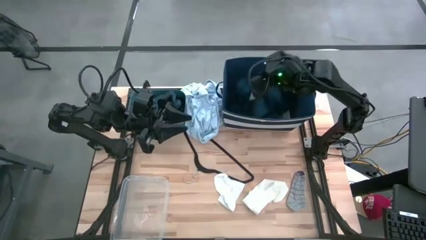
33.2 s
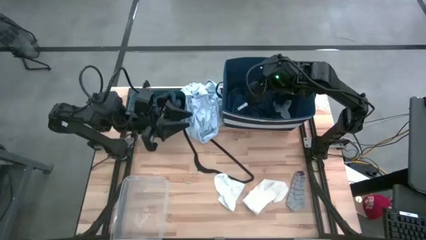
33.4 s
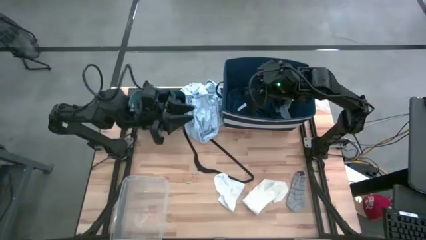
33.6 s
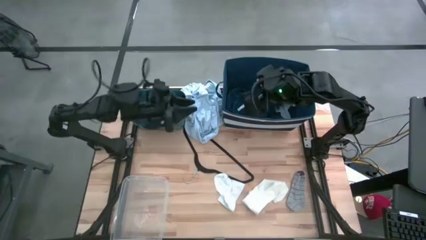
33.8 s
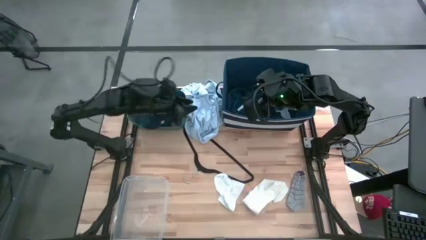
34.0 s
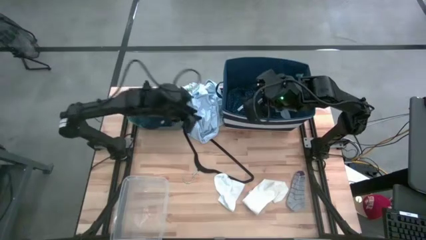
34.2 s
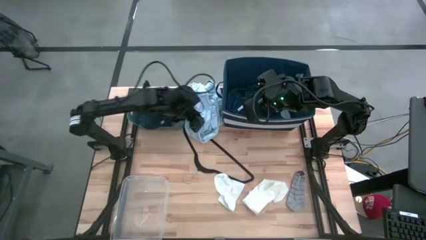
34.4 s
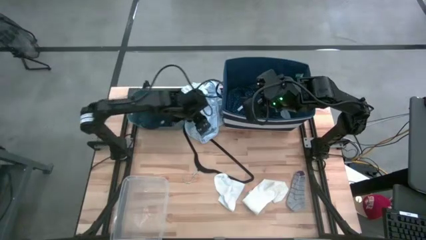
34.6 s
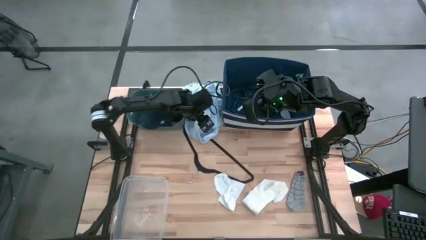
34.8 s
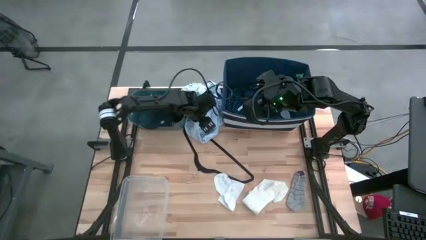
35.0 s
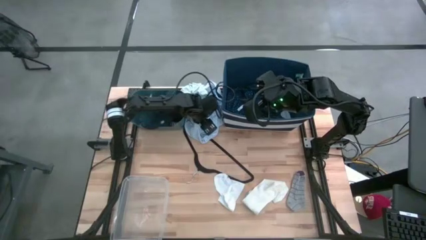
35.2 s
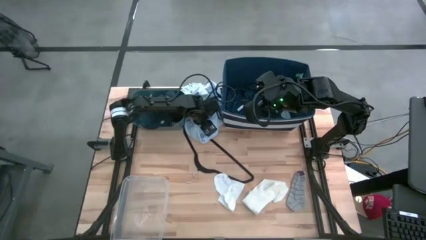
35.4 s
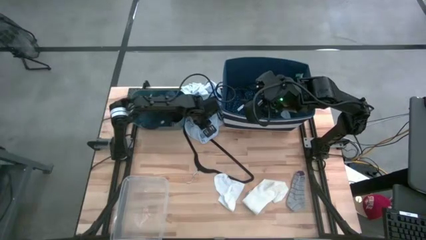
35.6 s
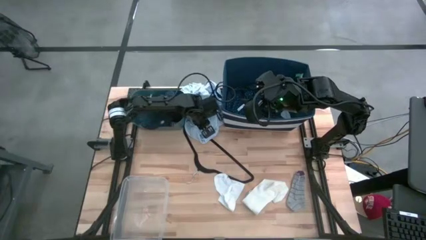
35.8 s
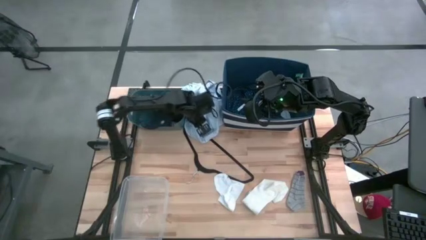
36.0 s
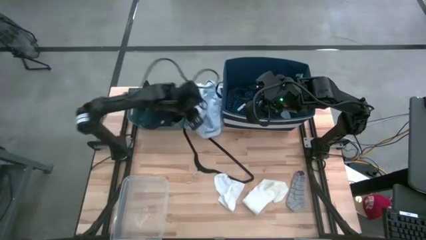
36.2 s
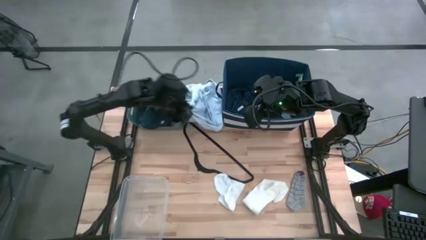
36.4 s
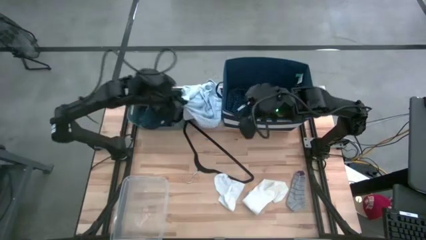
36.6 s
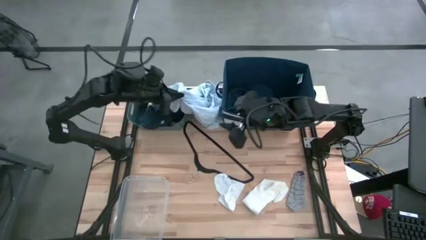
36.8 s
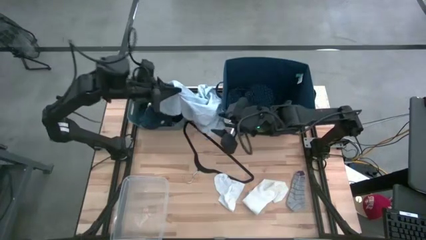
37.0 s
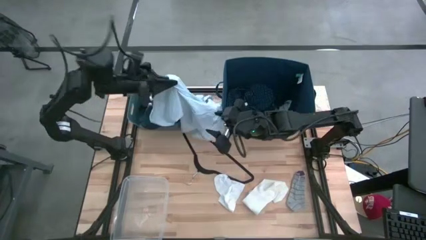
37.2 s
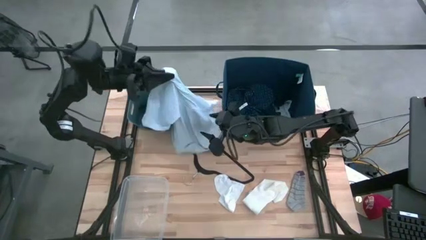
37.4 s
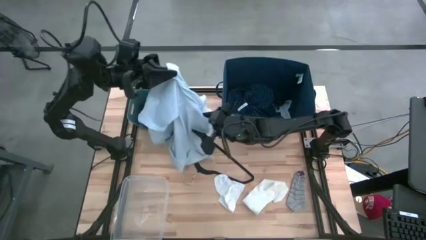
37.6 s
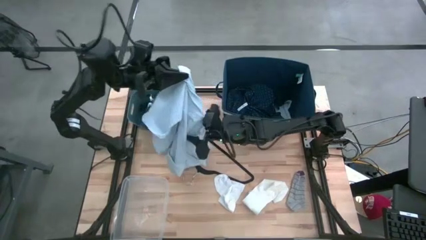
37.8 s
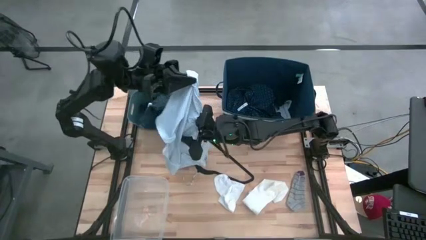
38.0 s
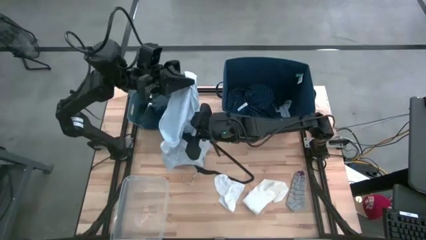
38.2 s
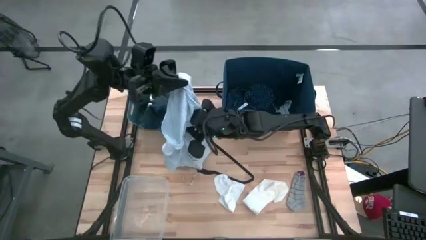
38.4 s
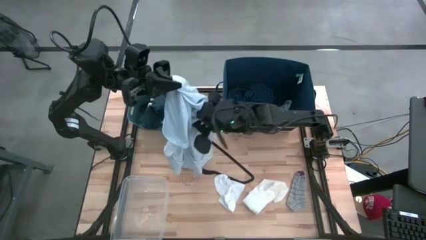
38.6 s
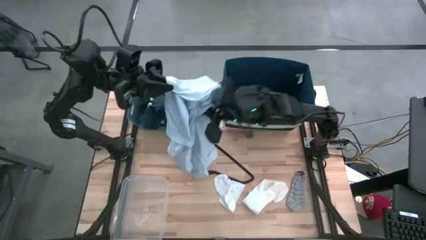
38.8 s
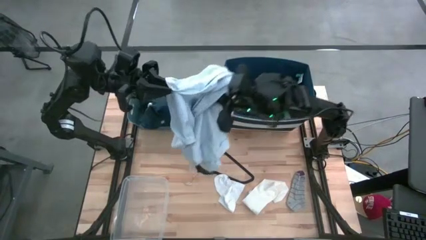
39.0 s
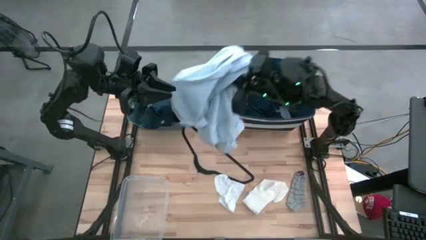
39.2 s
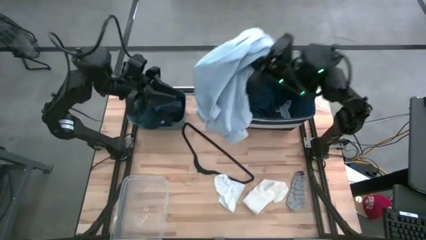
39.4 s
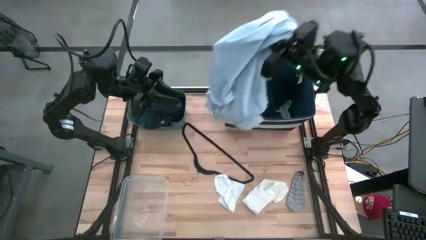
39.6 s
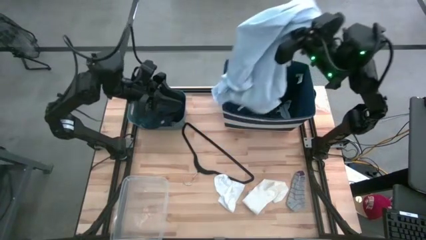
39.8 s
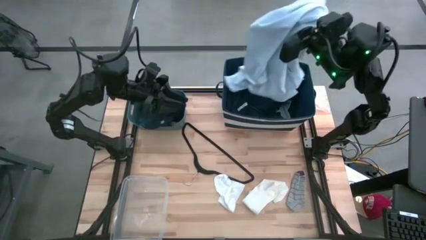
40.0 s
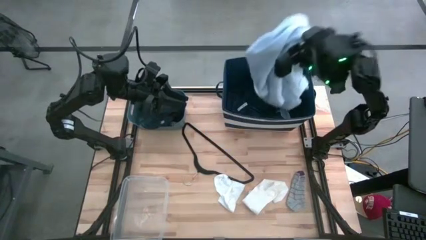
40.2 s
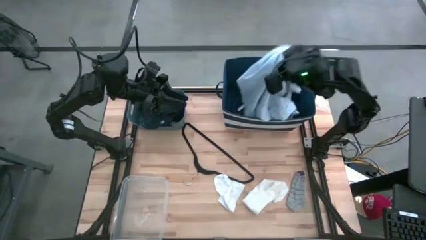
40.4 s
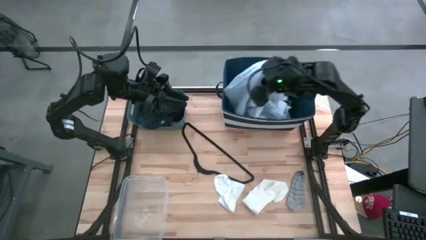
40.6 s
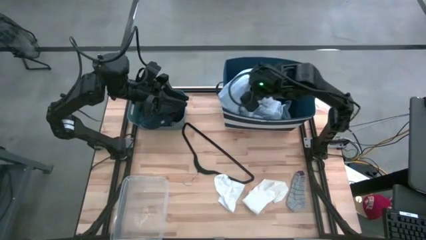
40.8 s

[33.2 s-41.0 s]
Task: Pick & Place Cloths
Put the white shirt into the blue bin

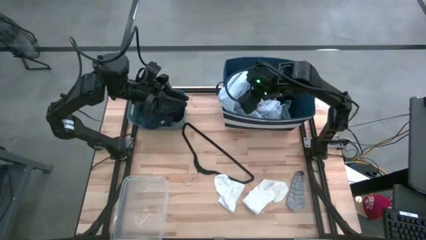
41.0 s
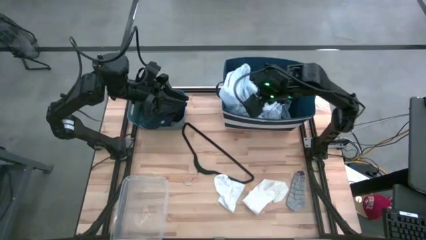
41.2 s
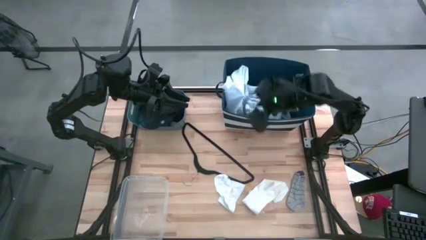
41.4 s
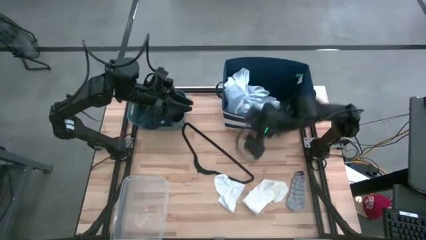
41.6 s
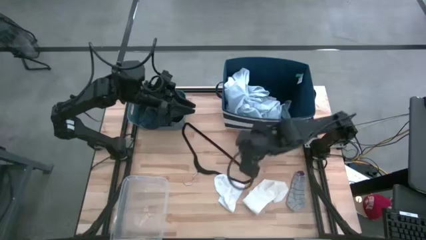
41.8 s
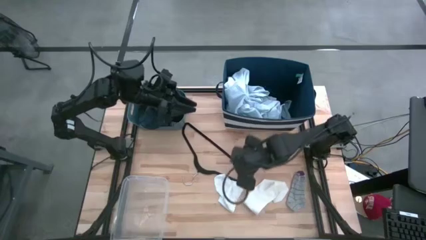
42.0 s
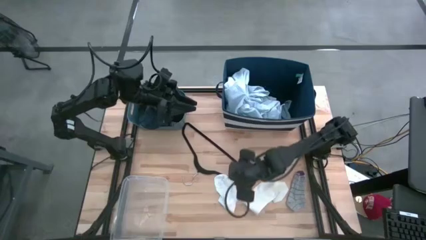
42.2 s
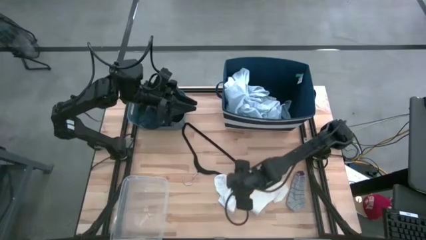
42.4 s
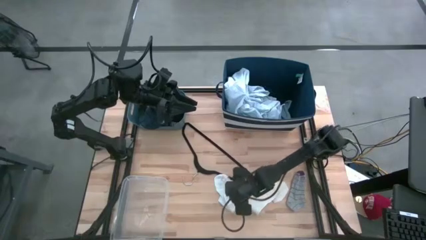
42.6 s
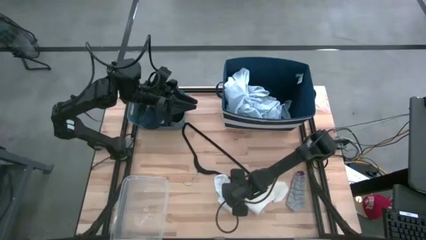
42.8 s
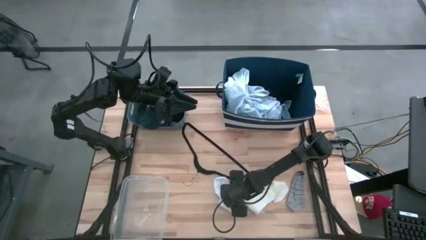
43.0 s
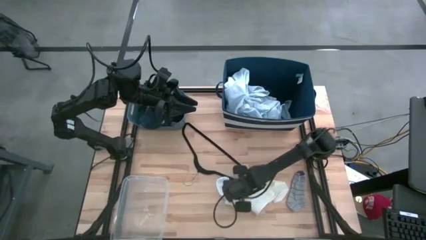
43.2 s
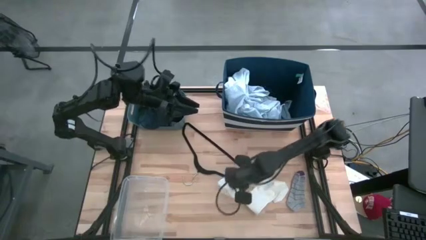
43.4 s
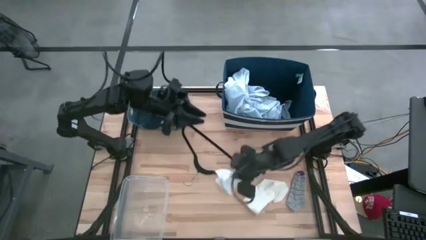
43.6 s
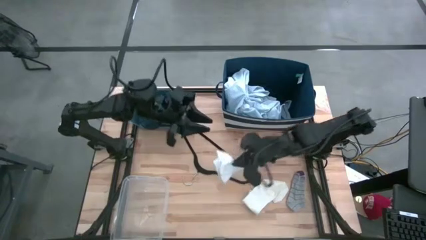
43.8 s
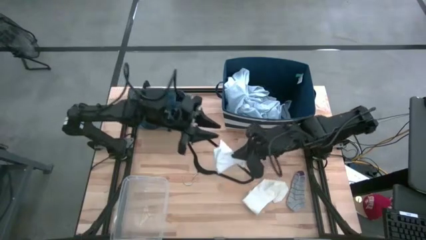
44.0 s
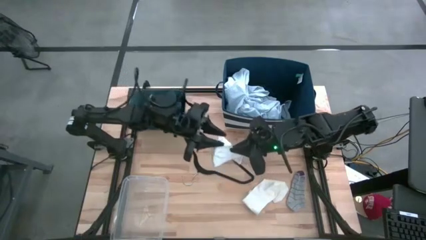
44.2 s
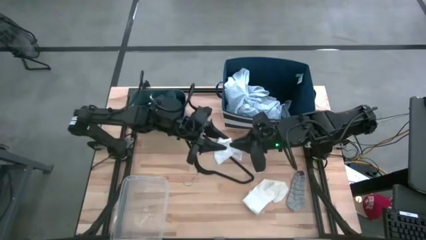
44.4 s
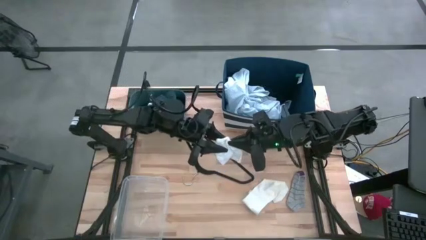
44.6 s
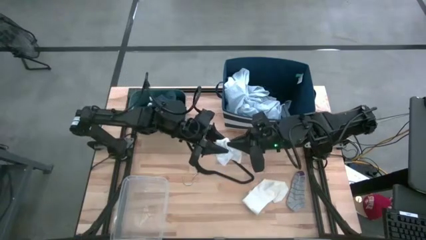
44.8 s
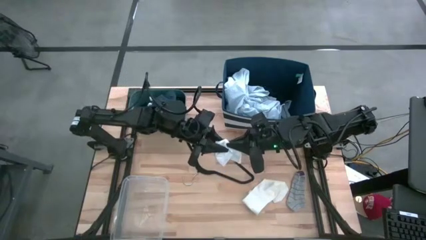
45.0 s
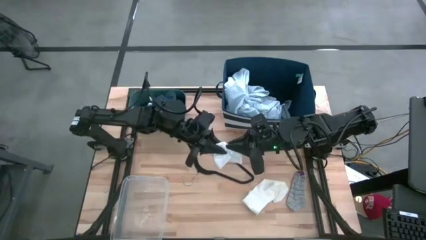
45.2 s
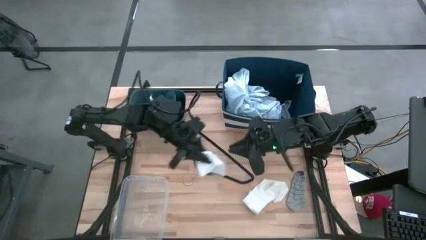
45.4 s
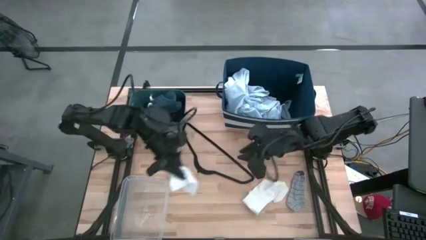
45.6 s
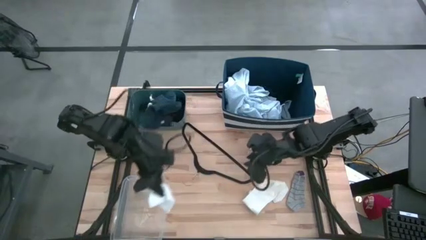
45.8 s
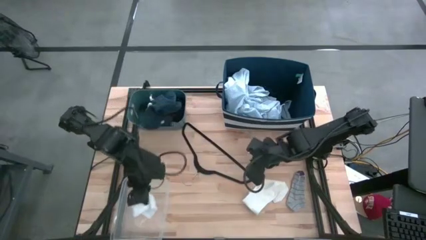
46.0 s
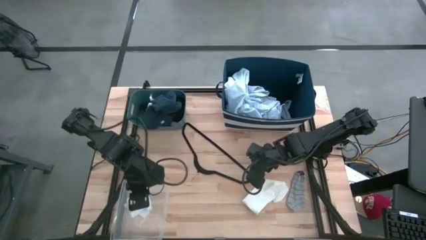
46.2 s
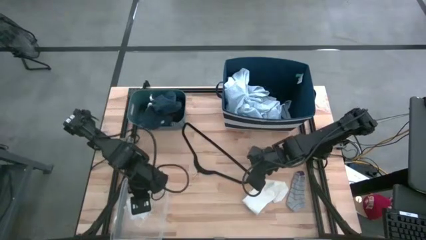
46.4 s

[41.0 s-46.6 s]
Put the white sock into the transparent bin

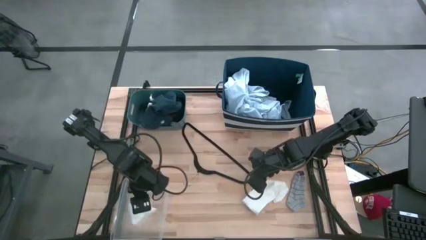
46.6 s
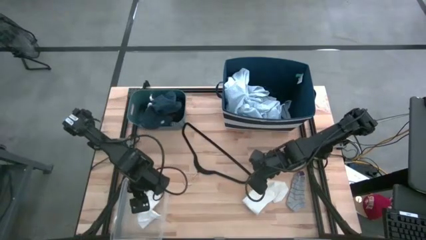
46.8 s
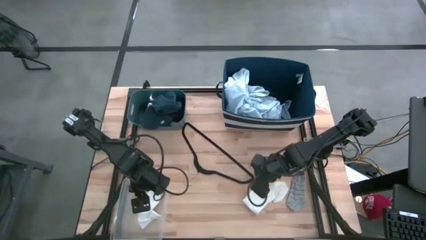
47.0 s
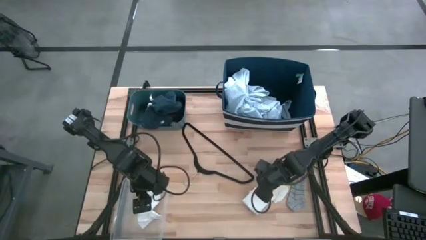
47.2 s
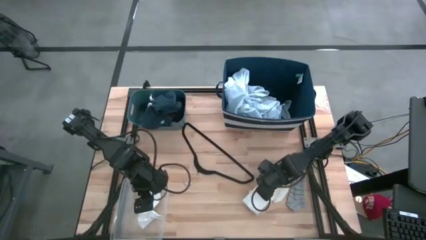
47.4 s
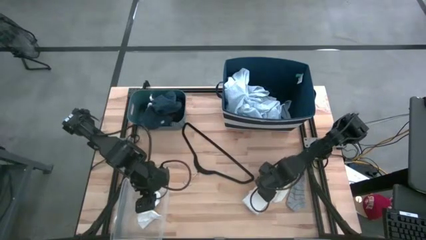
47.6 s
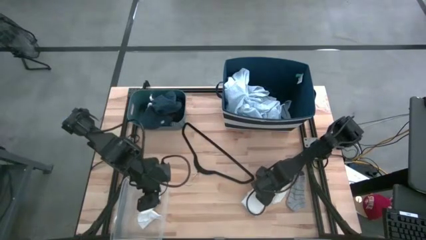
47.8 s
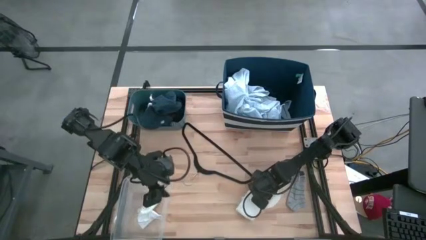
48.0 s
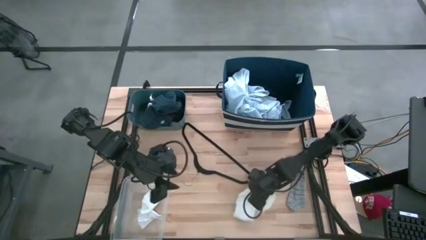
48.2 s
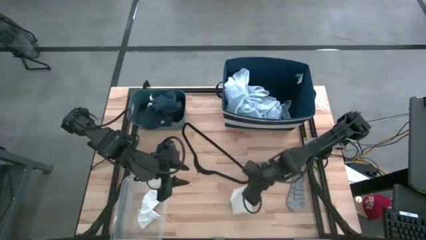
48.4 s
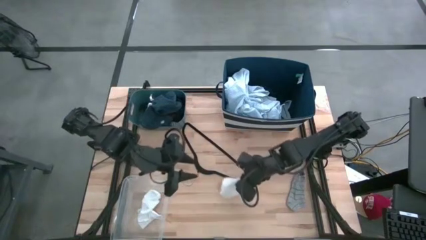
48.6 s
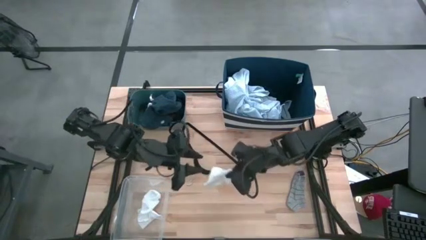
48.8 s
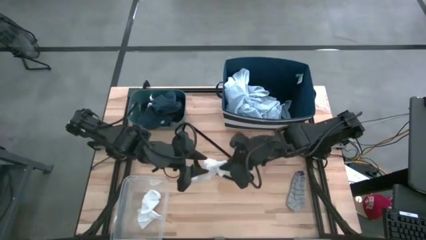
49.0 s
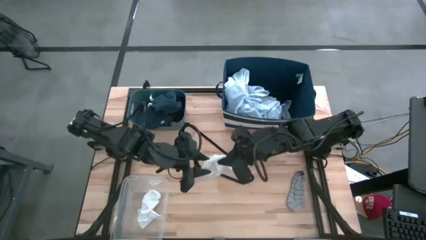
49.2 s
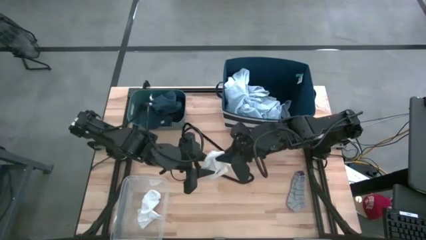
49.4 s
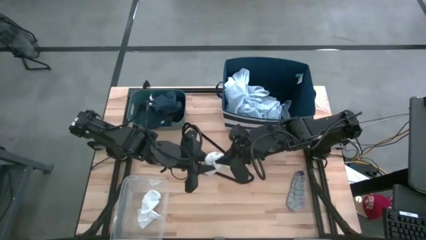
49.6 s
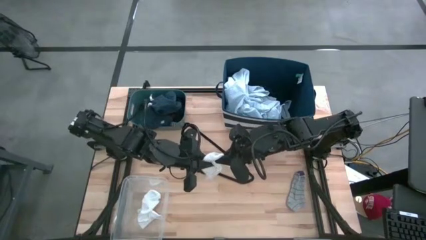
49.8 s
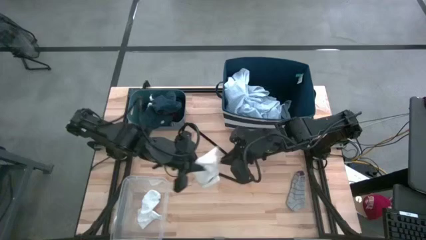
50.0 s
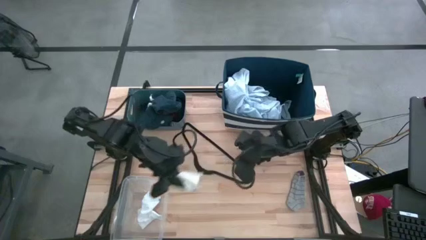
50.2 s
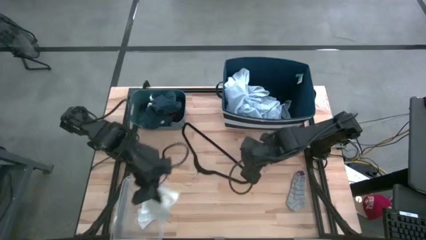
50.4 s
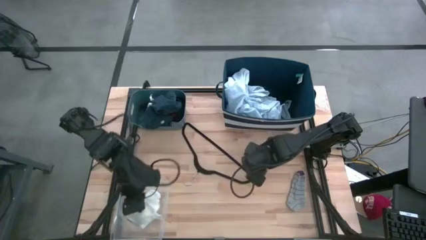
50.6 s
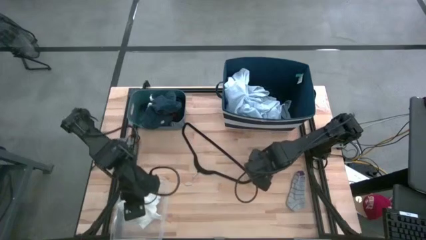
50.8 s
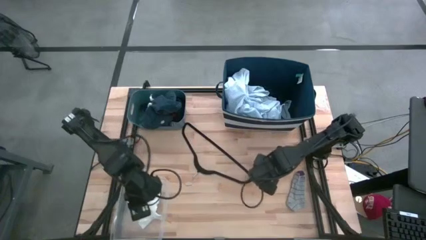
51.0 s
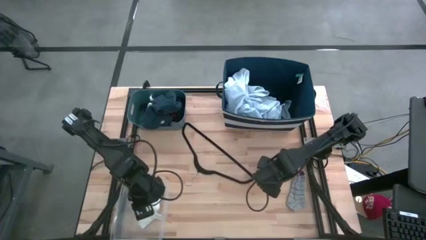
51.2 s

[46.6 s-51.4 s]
Put the light brown sock into the transparent bin
